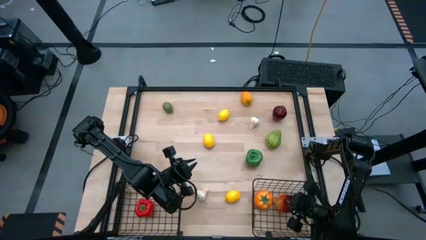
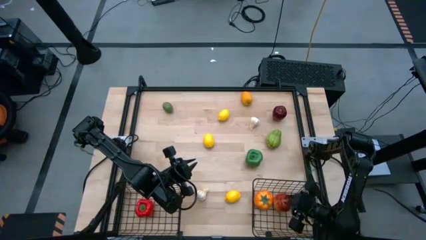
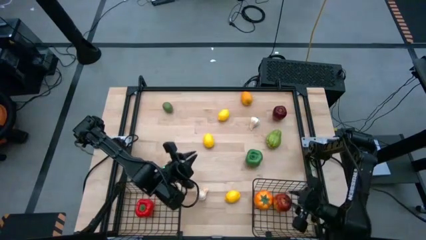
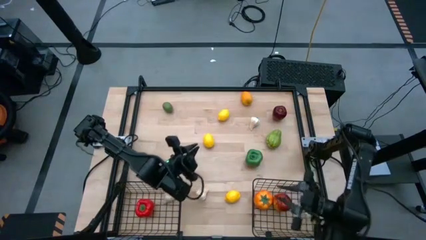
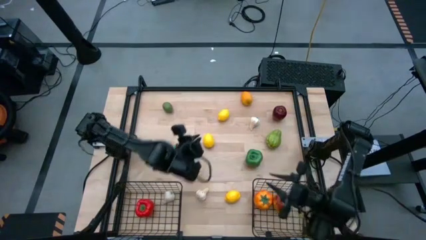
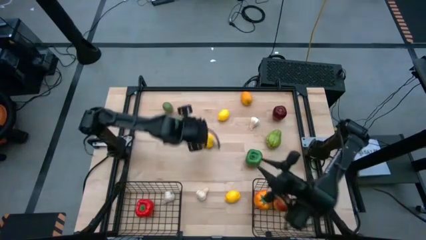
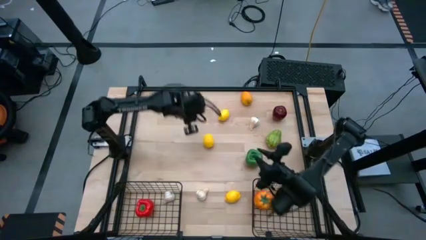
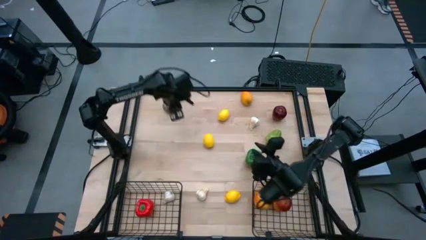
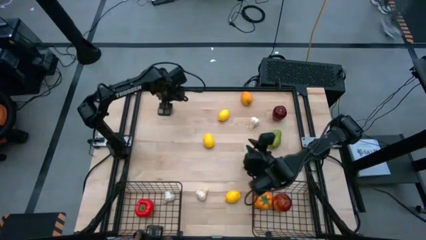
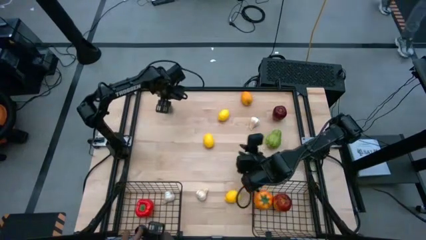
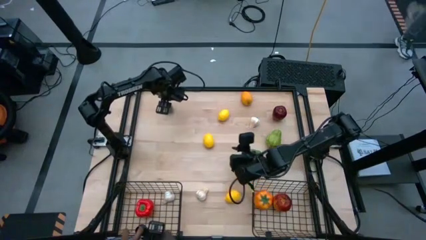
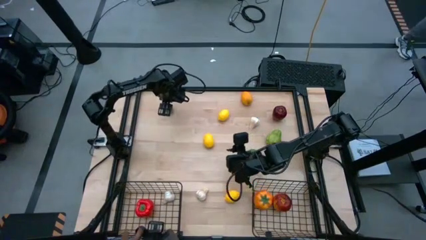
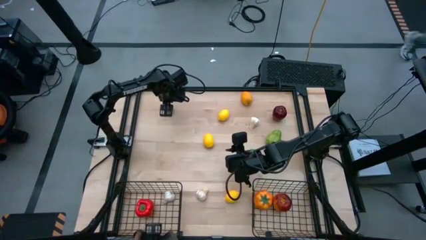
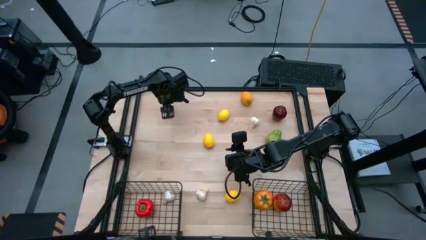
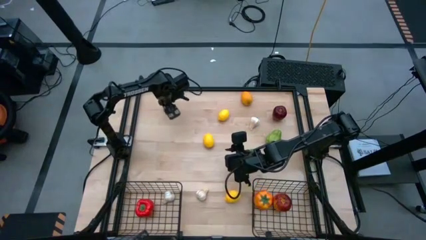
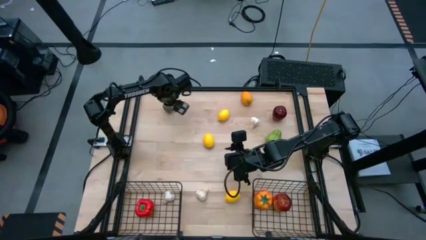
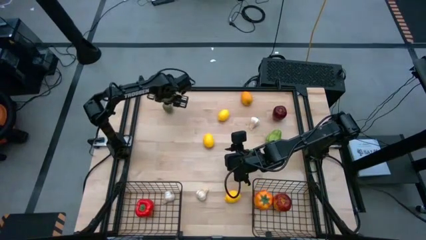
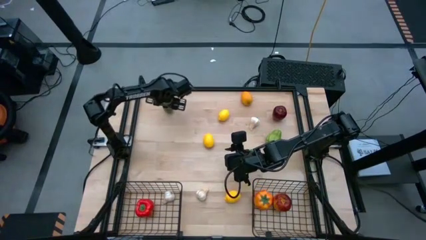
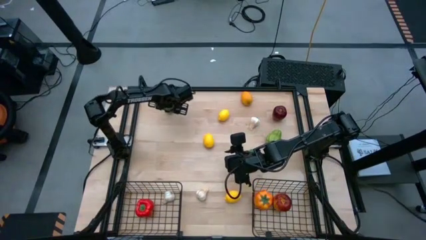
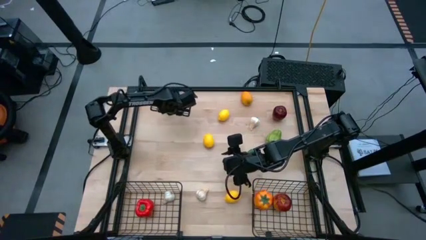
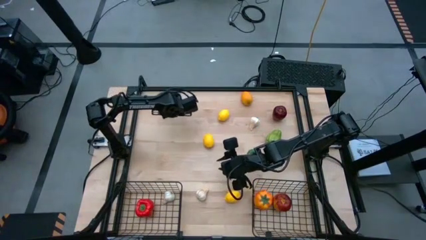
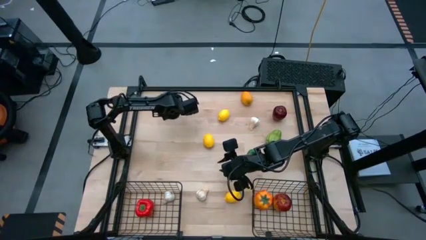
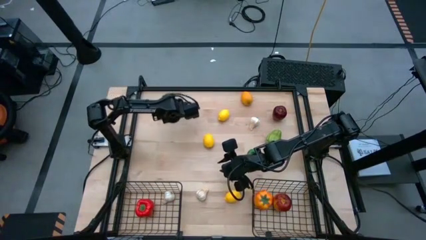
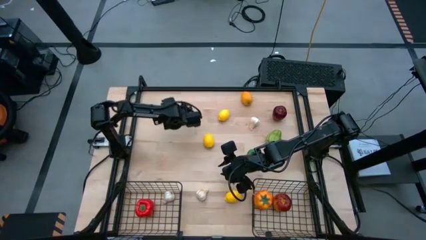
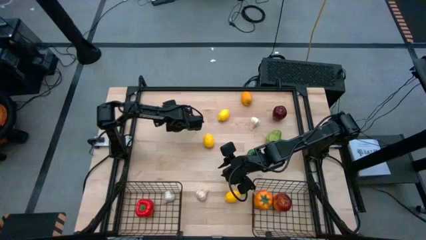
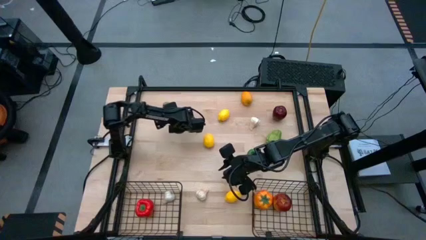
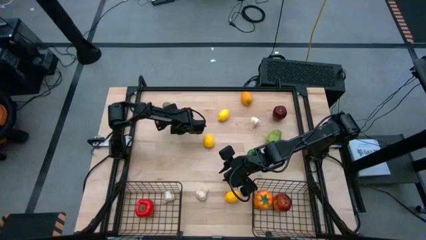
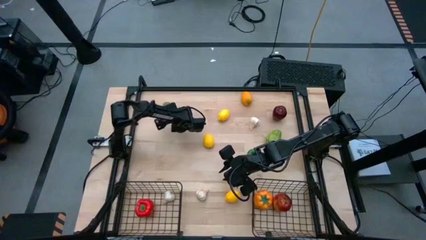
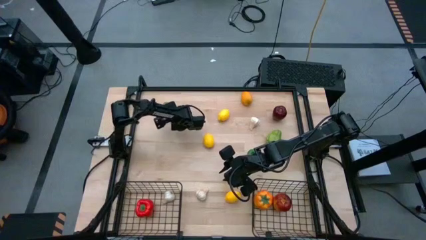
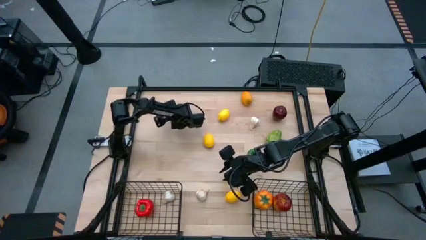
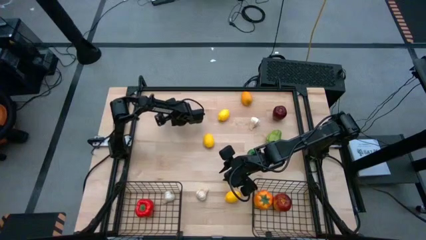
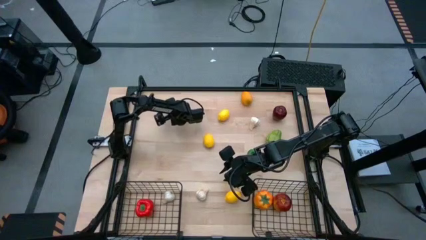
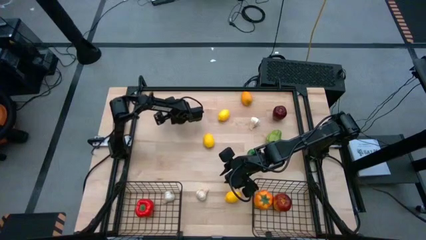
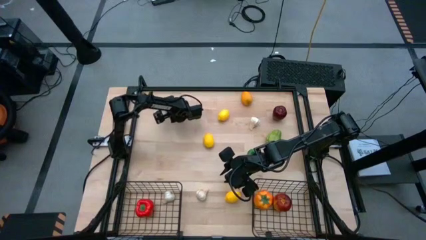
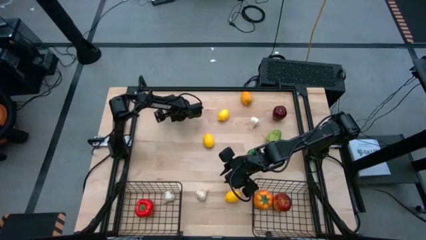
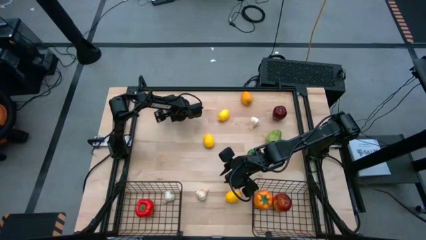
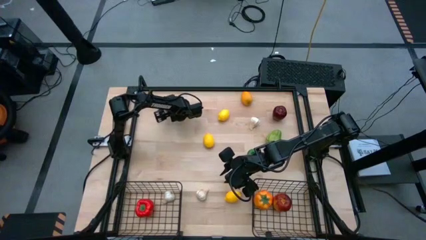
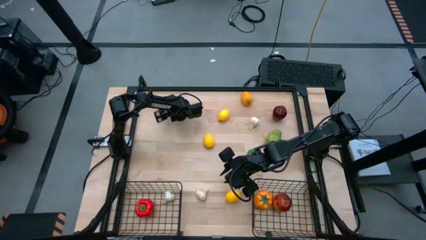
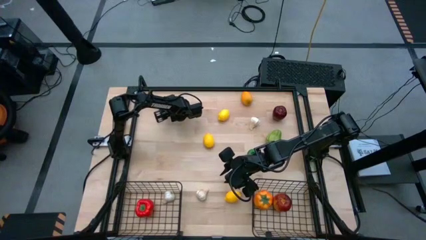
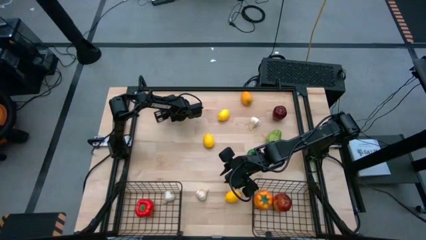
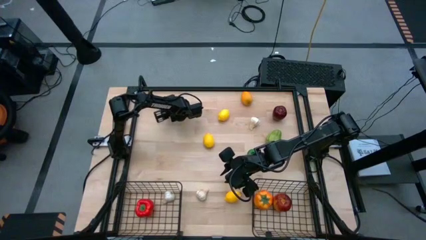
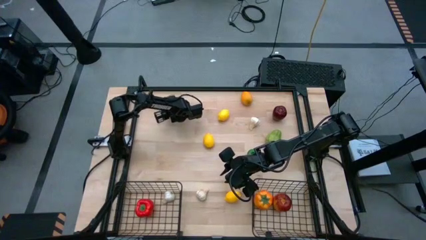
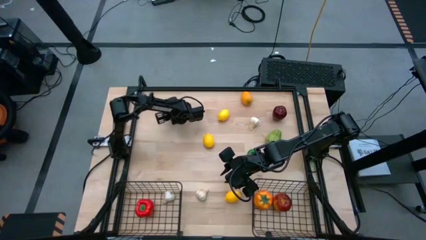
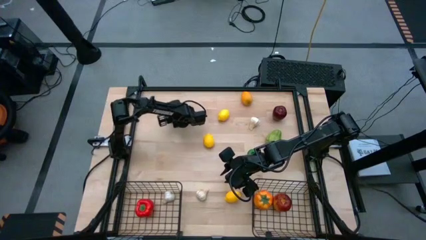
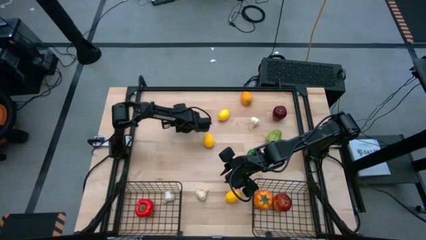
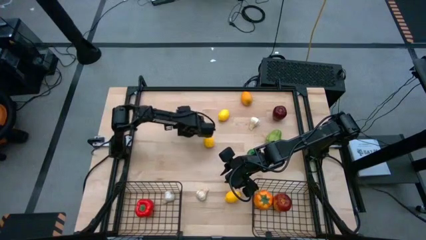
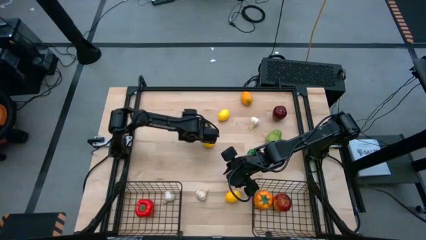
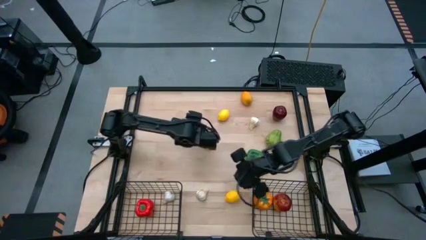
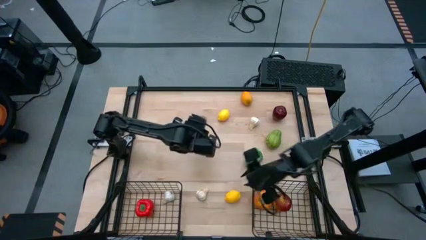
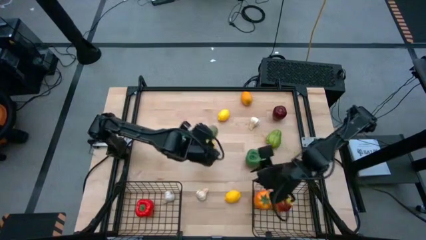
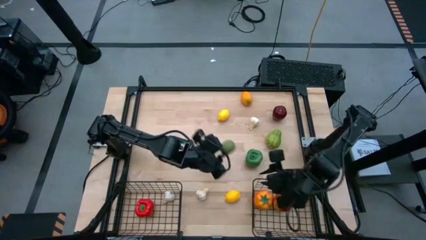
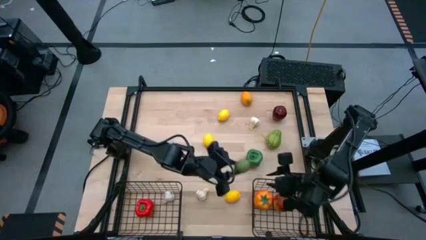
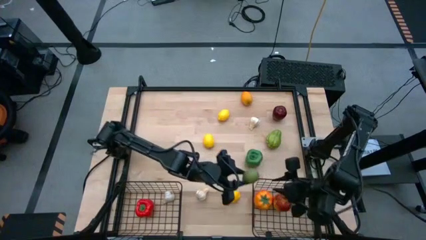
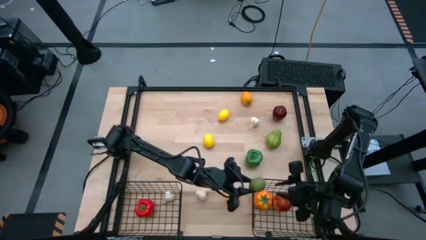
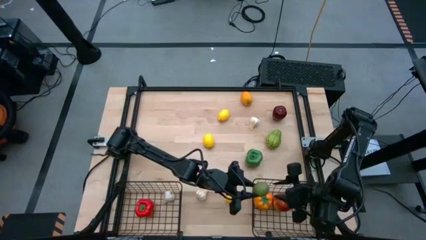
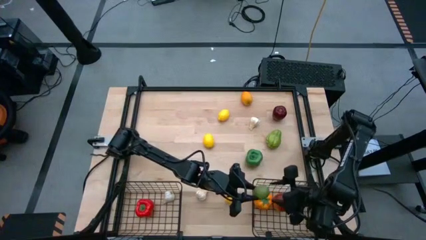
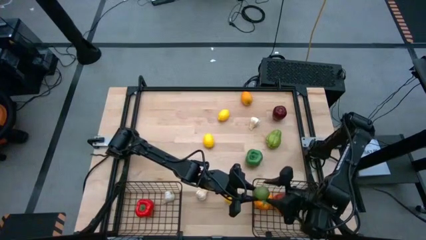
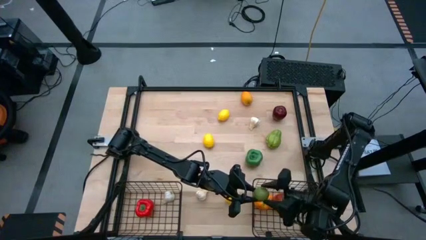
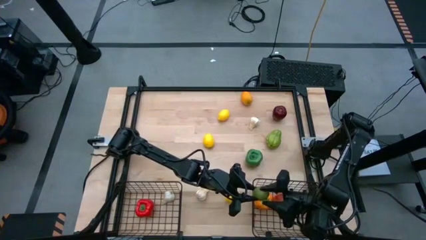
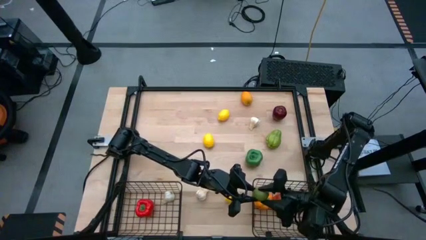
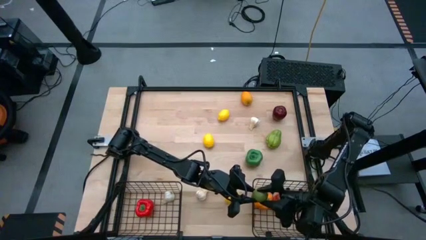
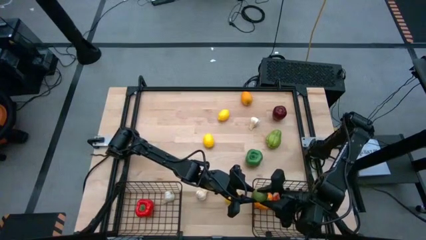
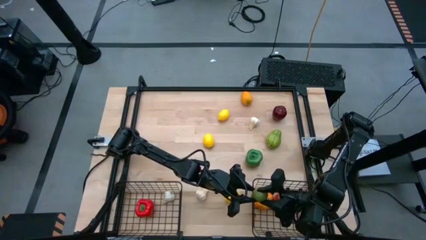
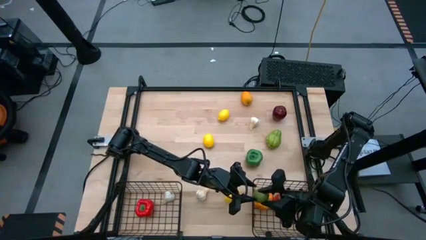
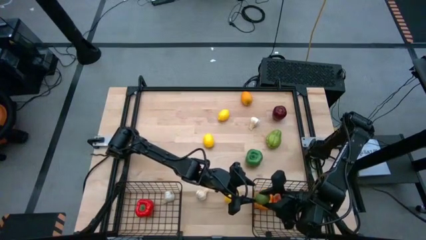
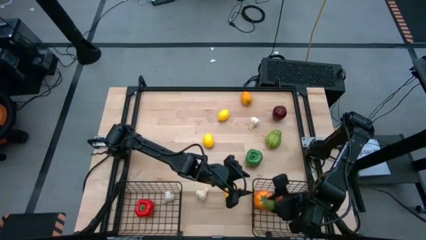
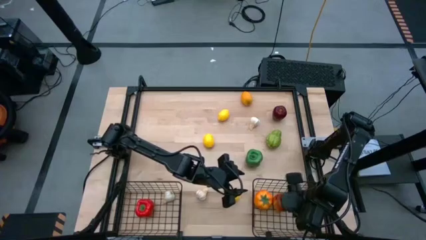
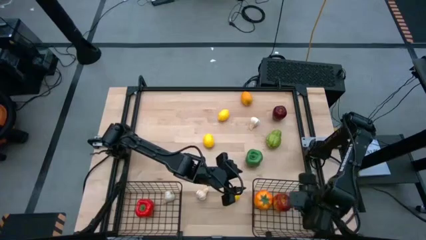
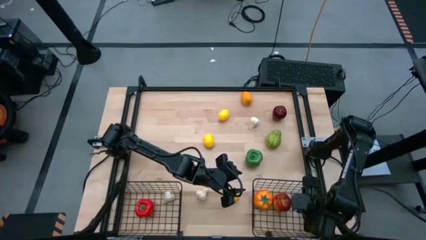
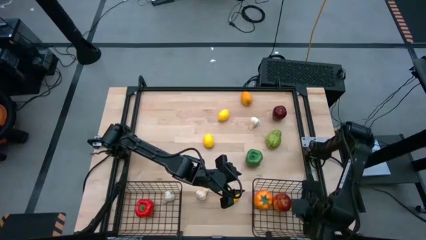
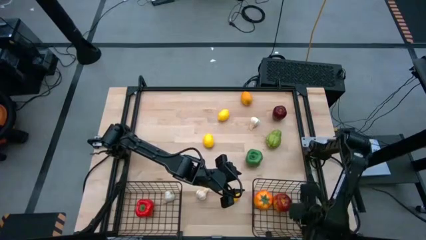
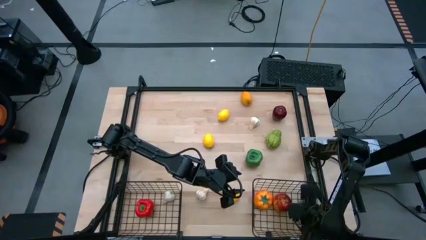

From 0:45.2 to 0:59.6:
Task: Sort produce into baskets
Put the green lime into the right black wire basket
